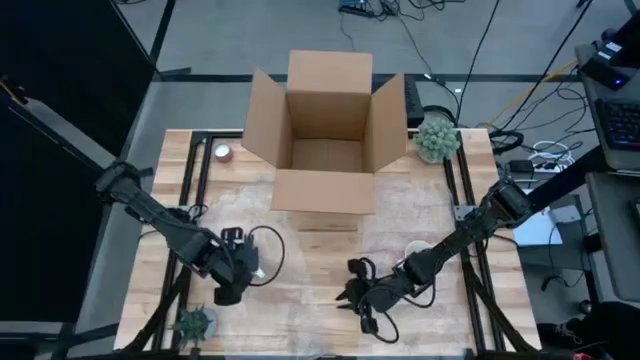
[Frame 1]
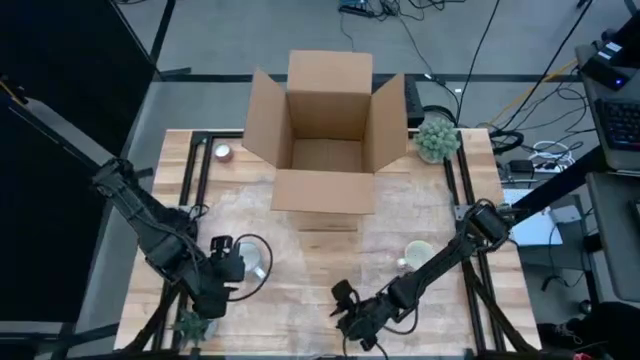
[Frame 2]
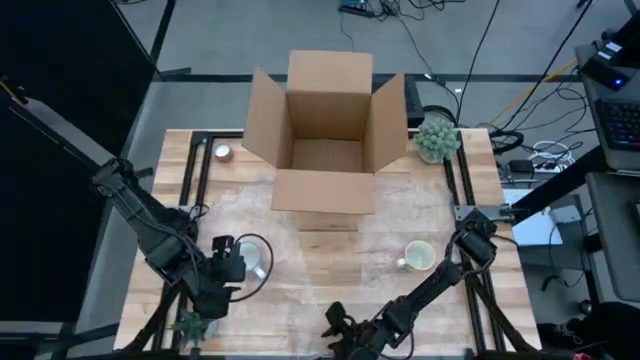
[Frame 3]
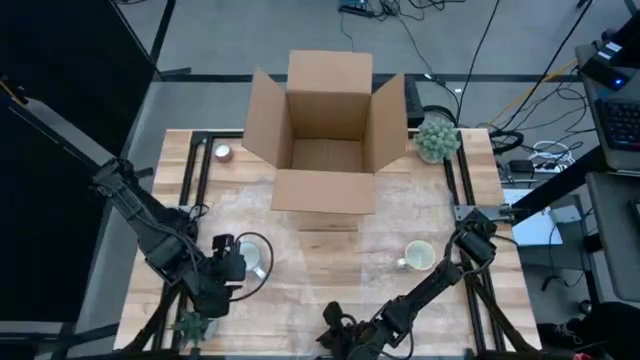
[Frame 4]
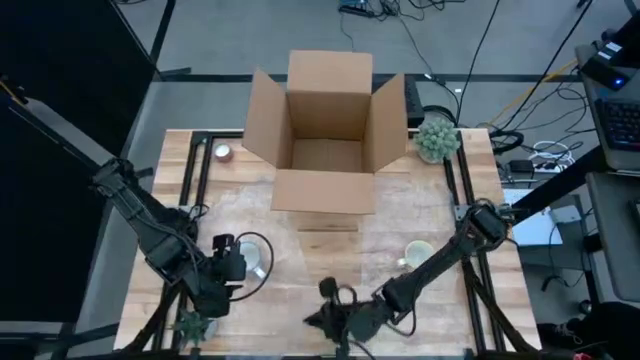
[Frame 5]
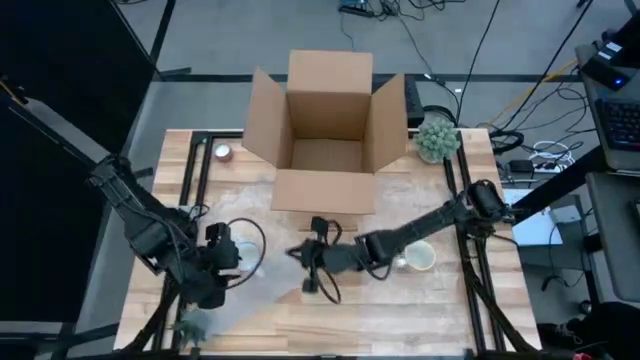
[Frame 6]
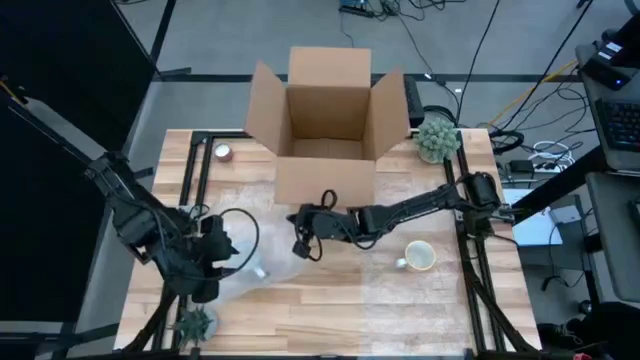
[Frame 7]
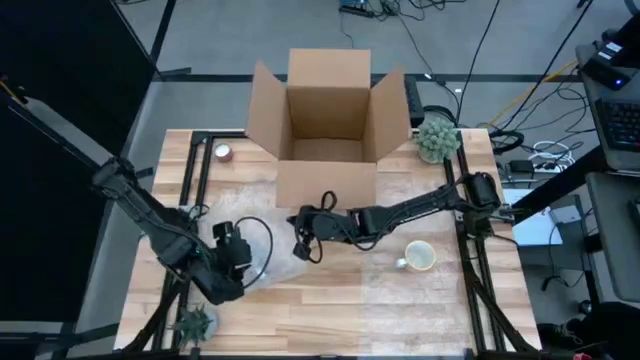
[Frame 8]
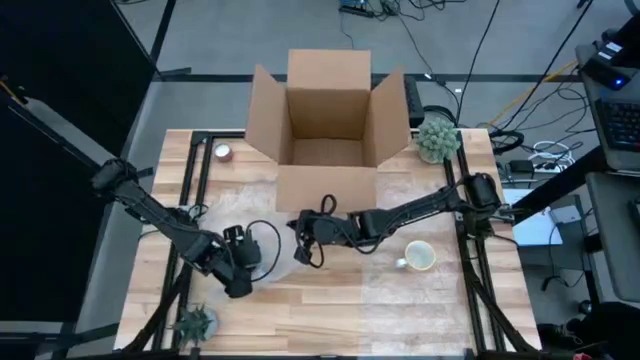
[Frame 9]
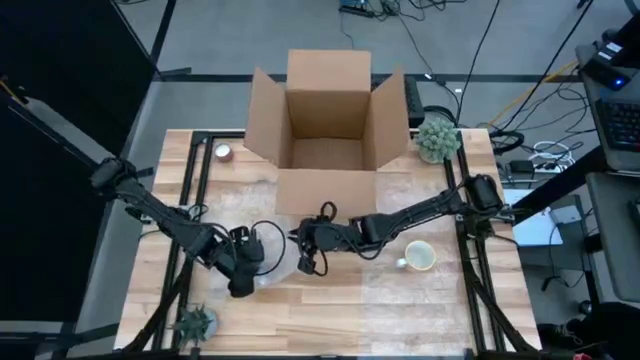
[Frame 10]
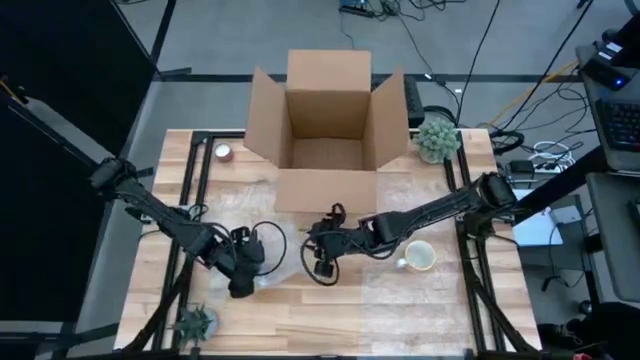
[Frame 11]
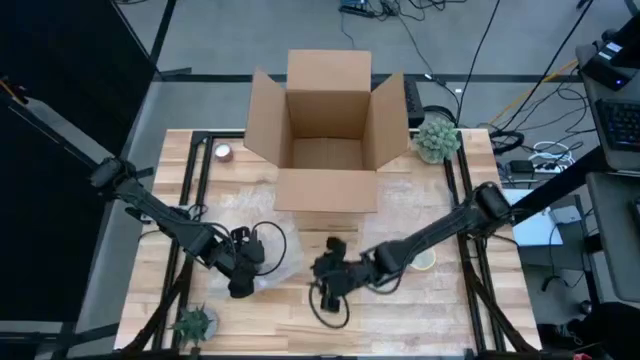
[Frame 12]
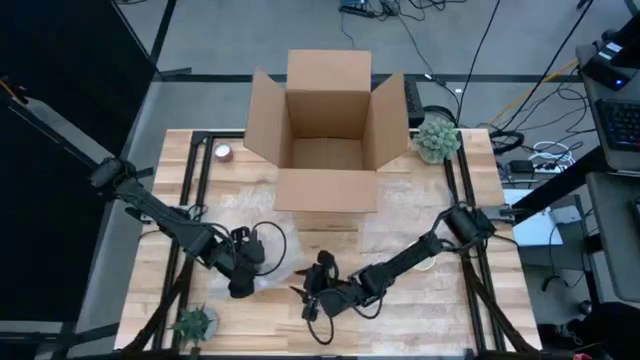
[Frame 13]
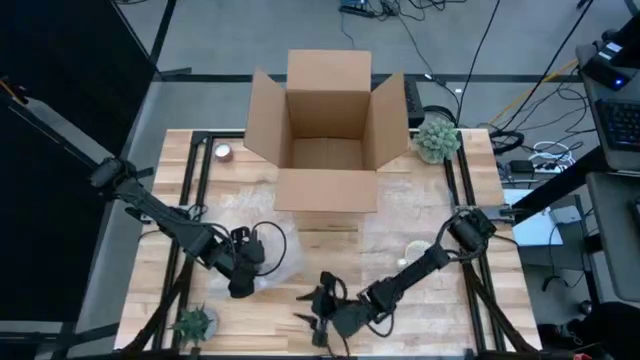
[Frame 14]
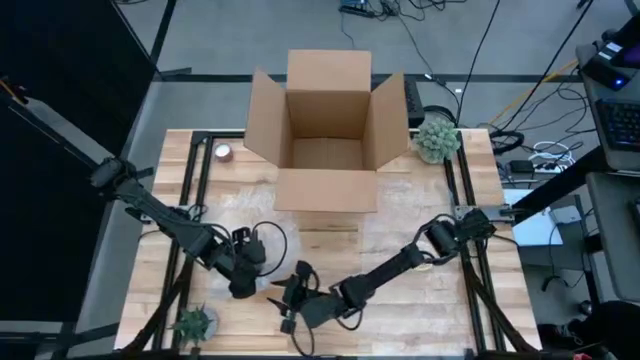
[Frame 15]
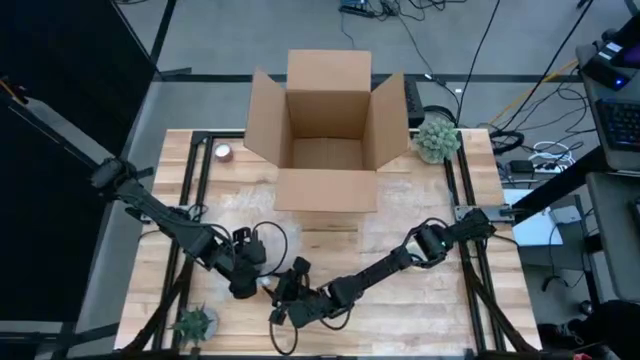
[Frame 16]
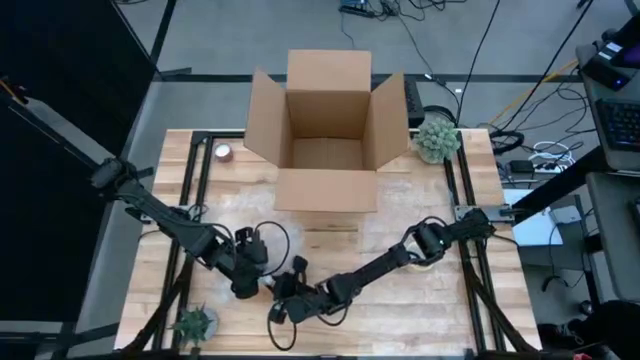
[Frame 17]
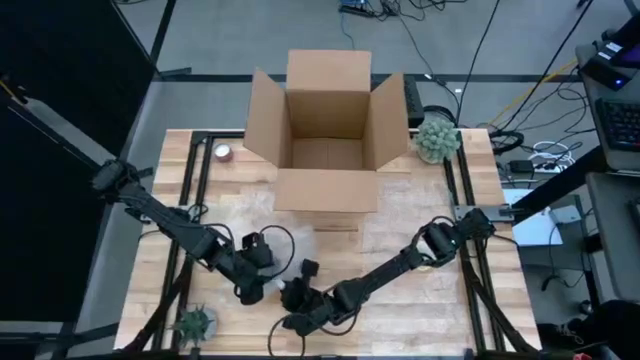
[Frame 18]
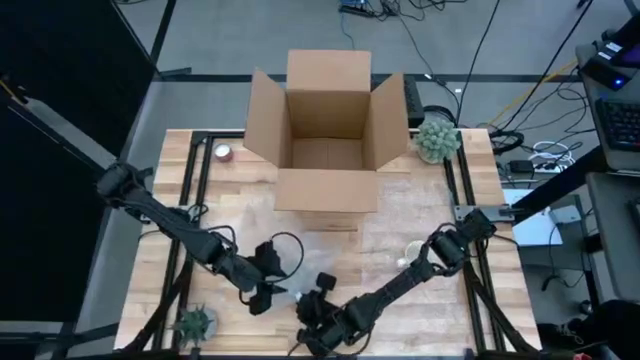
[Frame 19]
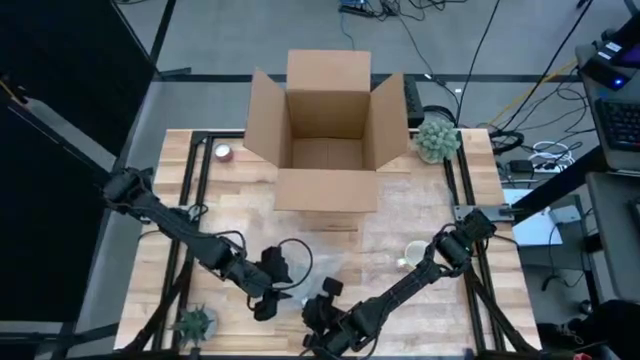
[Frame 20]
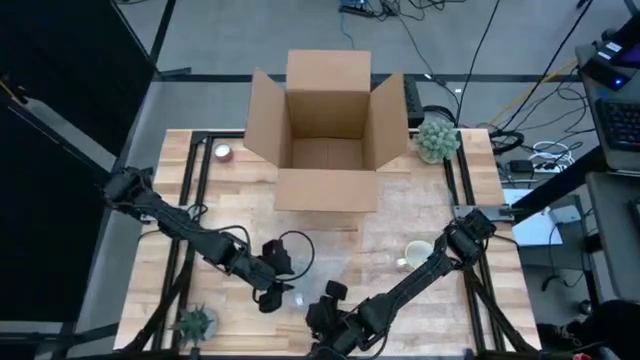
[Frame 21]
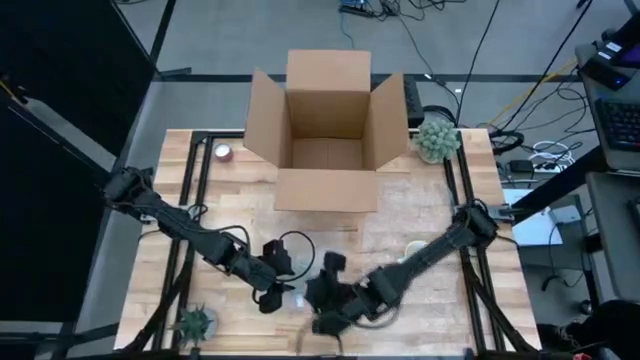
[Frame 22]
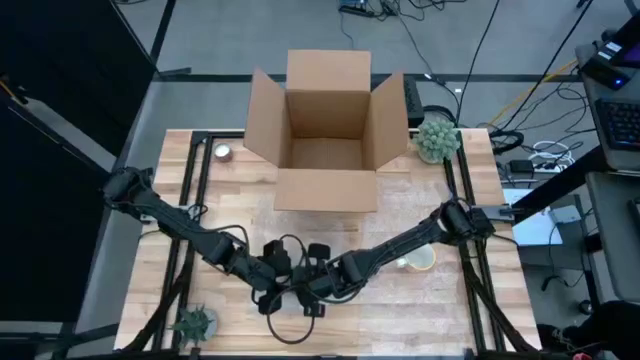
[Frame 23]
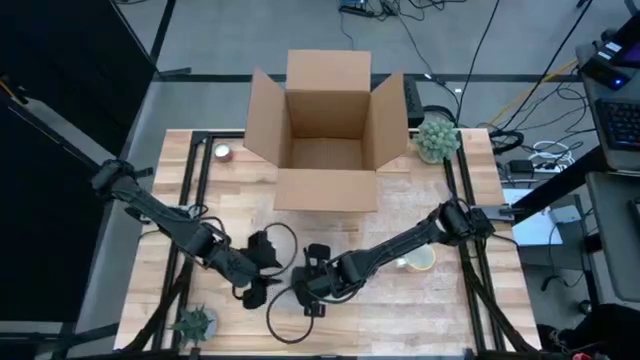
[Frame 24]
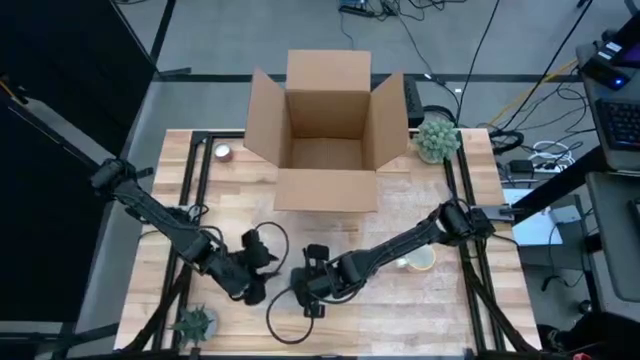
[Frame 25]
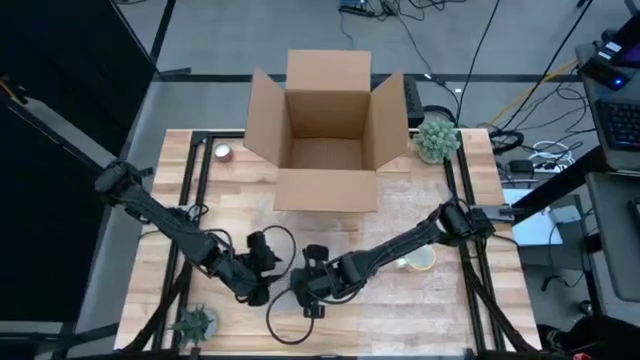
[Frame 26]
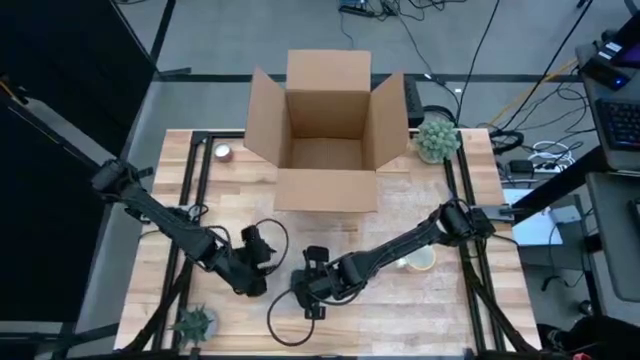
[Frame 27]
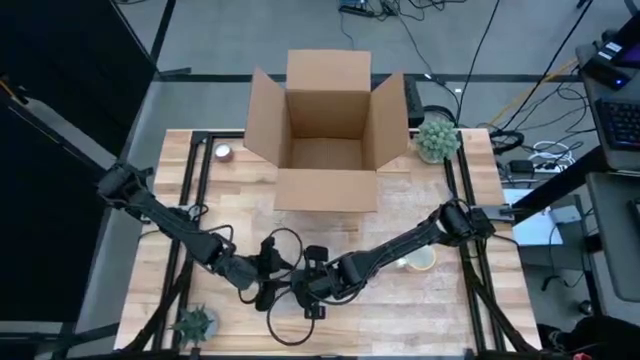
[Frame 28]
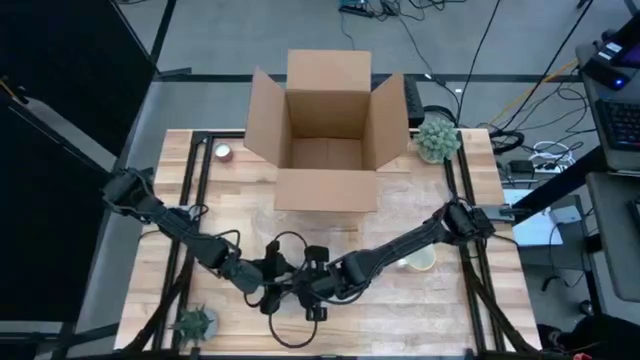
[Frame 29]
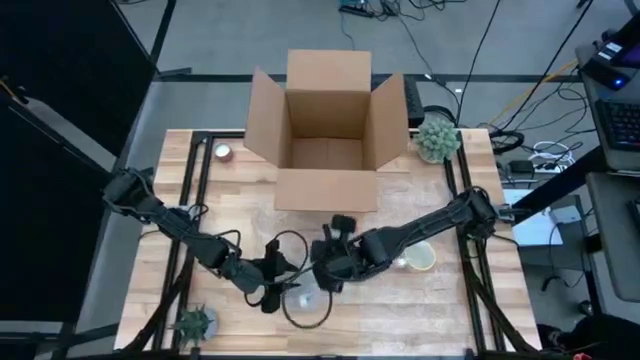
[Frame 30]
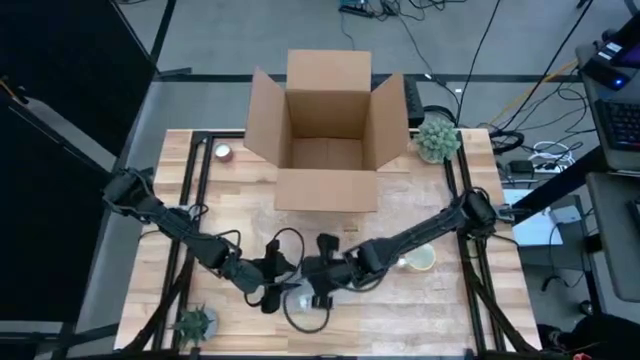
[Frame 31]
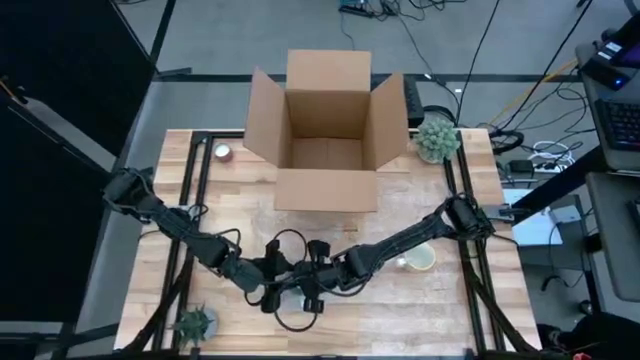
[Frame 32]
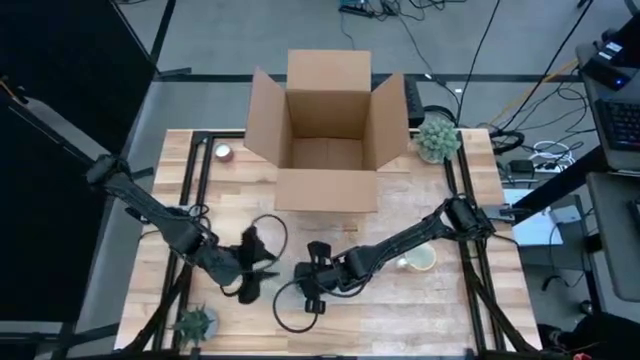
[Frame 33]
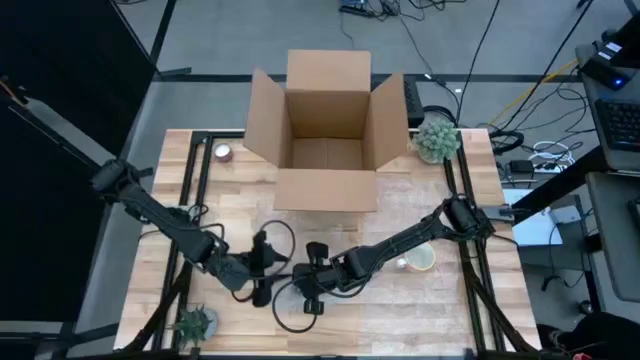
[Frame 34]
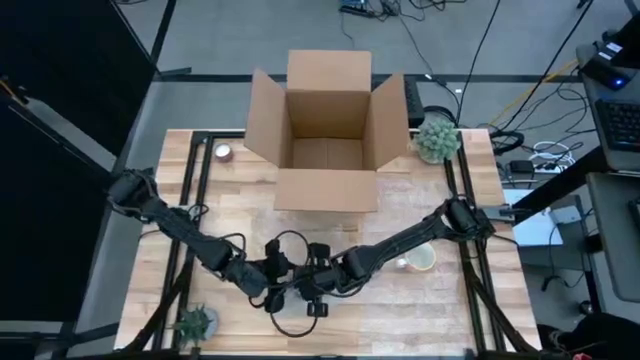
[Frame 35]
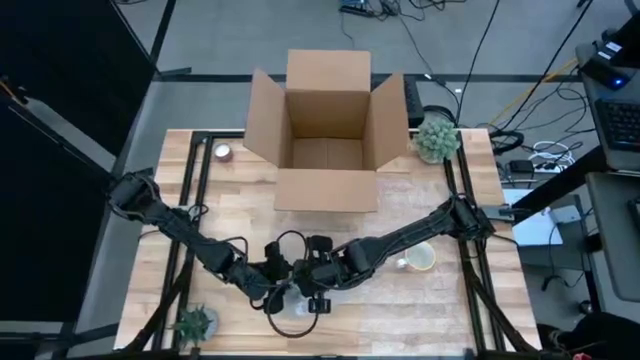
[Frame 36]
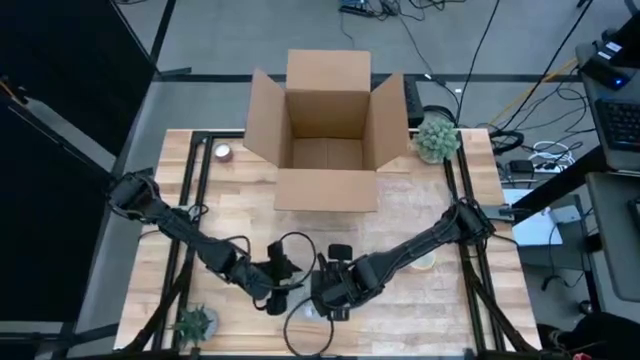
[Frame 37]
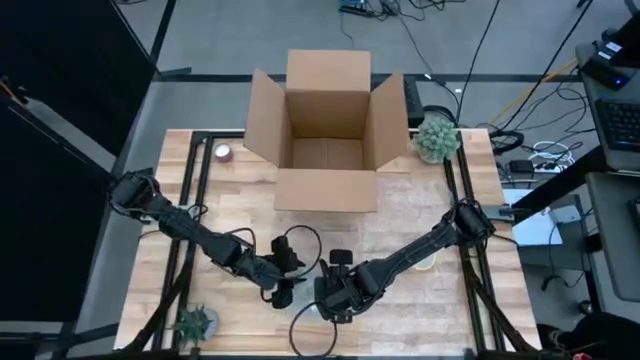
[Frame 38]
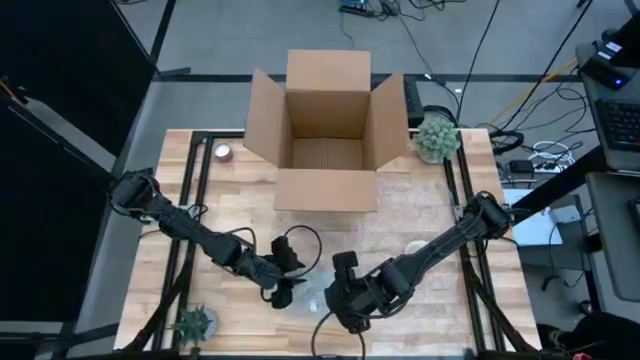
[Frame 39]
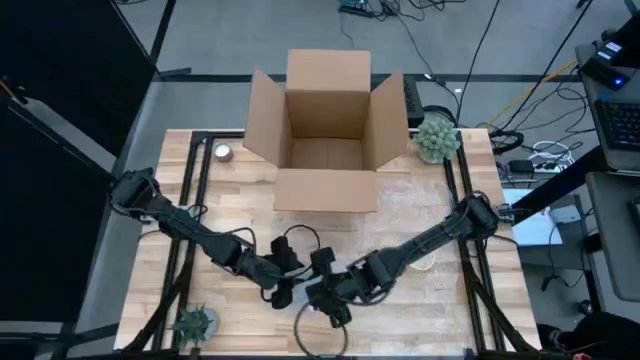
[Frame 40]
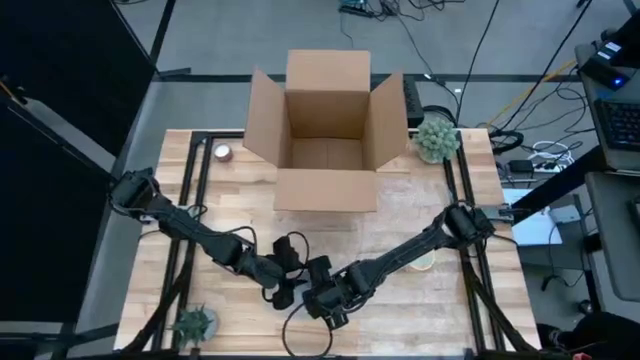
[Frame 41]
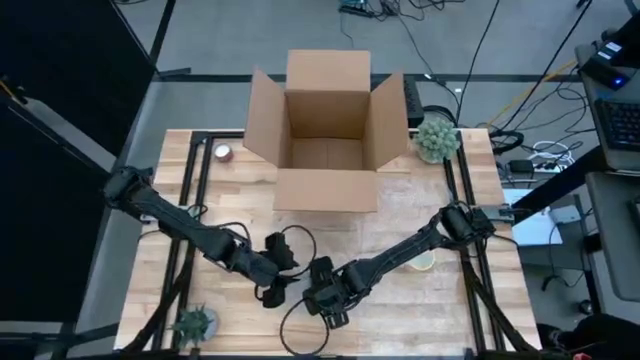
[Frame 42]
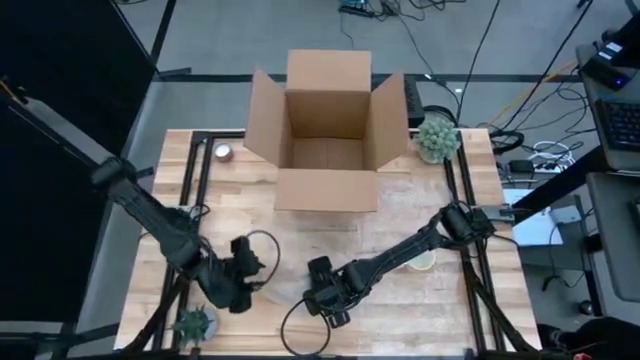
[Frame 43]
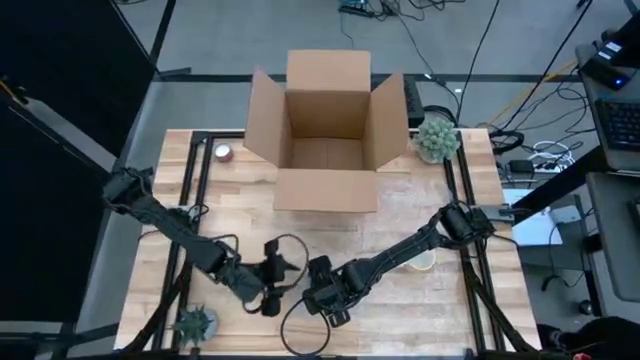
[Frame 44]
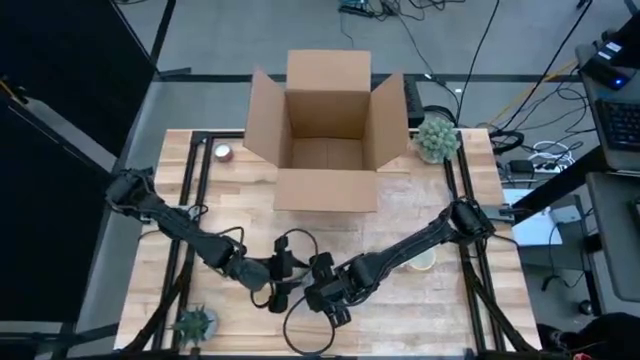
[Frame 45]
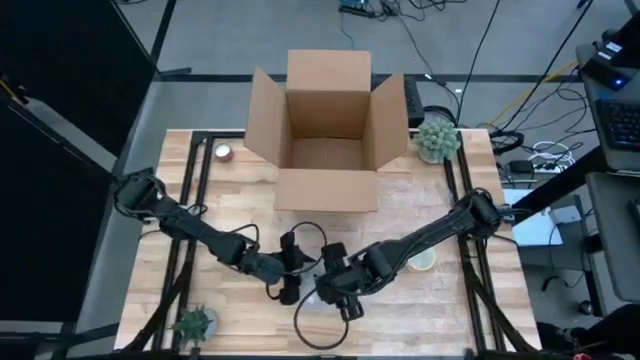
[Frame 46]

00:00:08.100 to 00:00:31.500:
Task: wrap mug
Wrap the red cup with the left transparent bubble wrap
